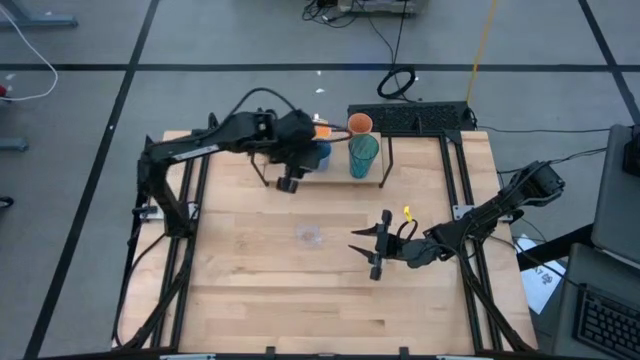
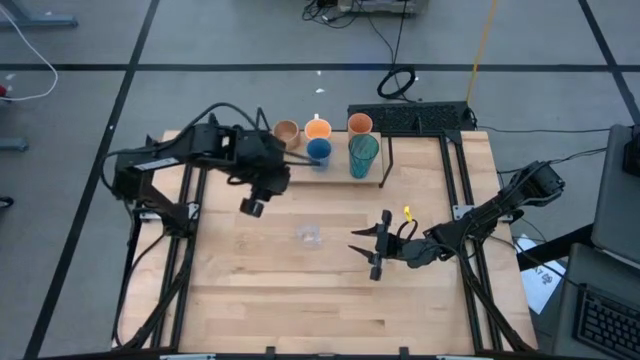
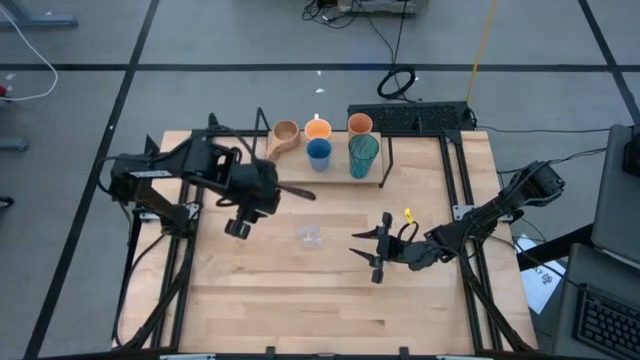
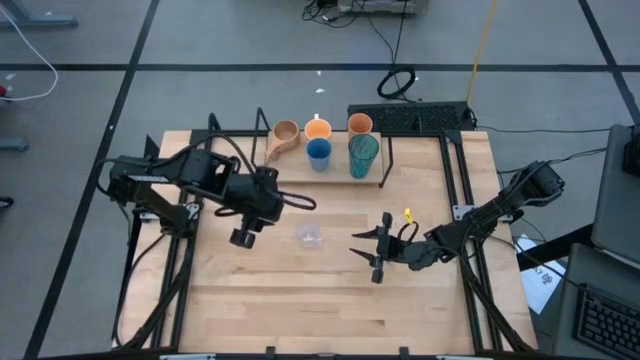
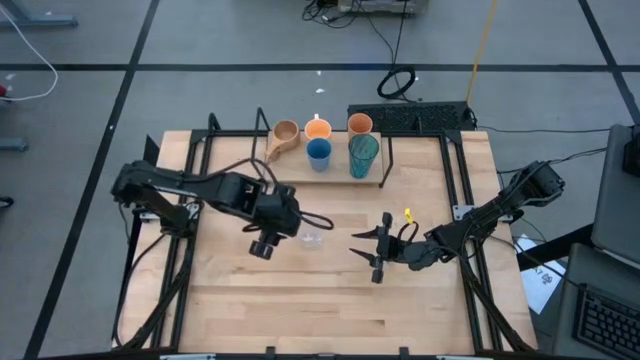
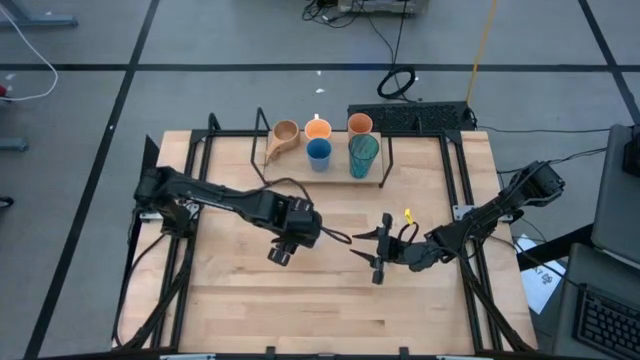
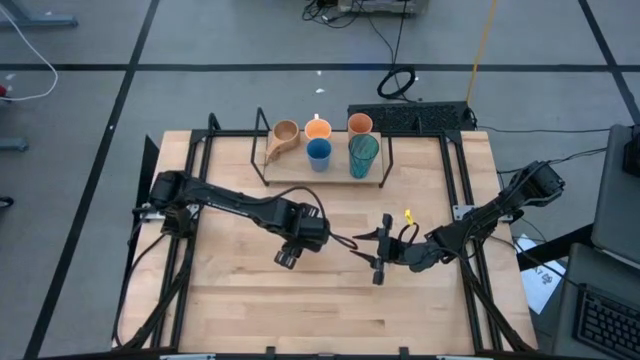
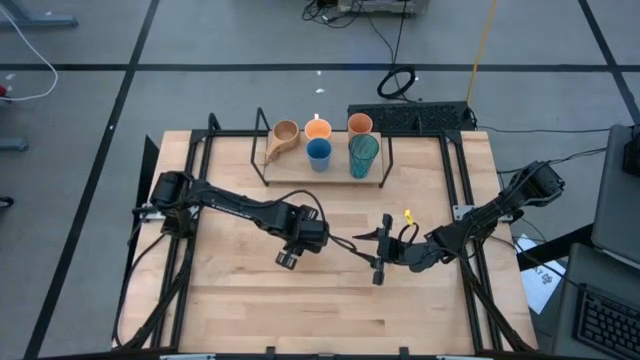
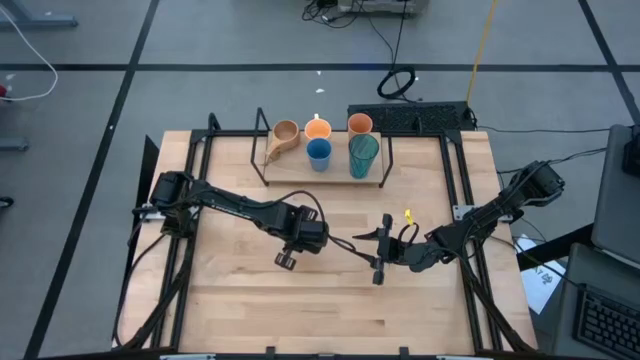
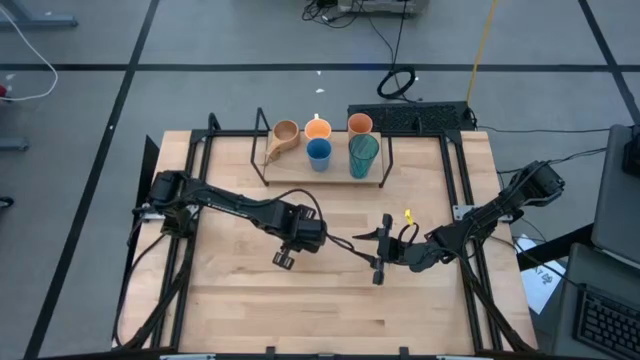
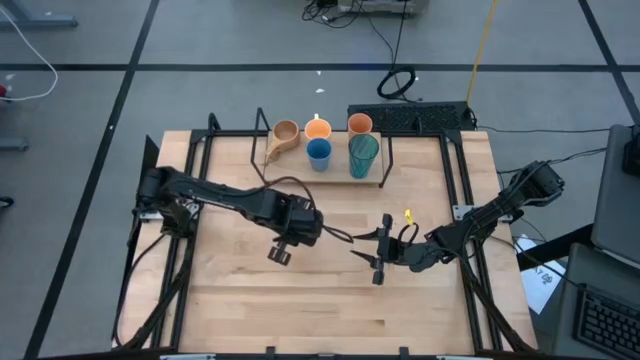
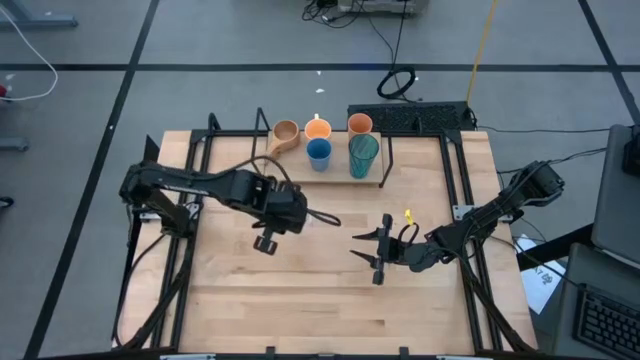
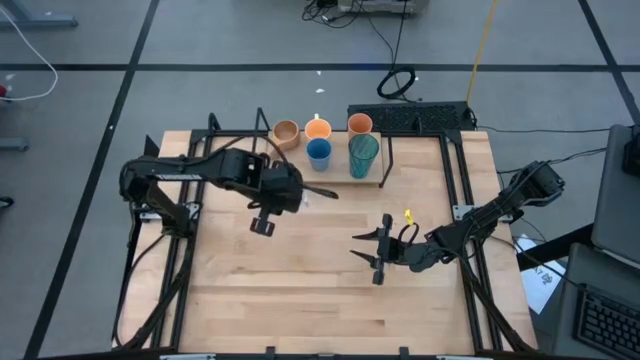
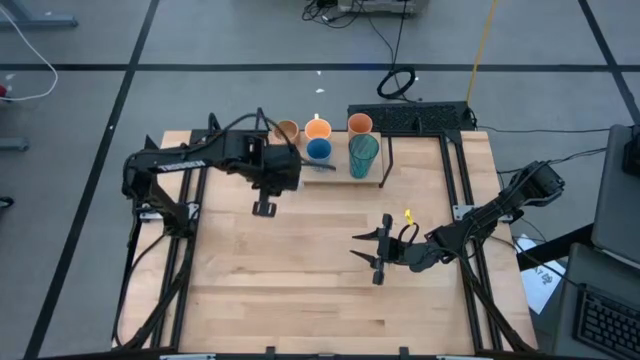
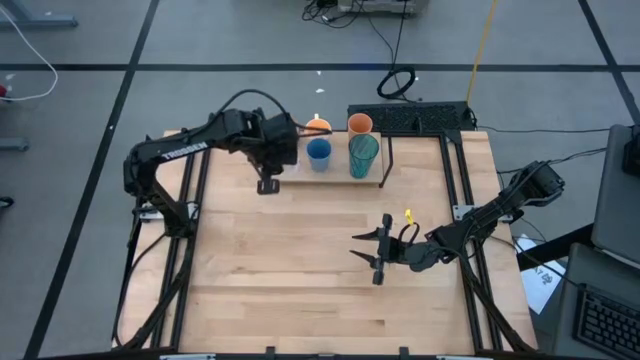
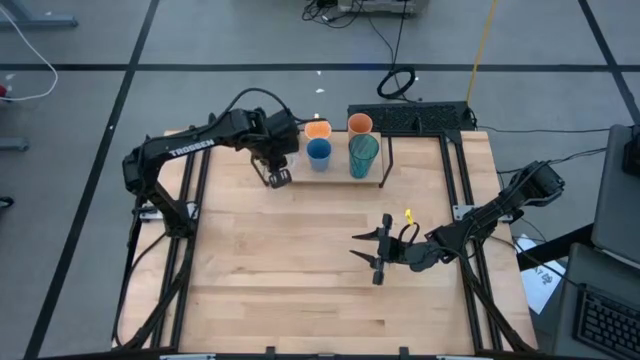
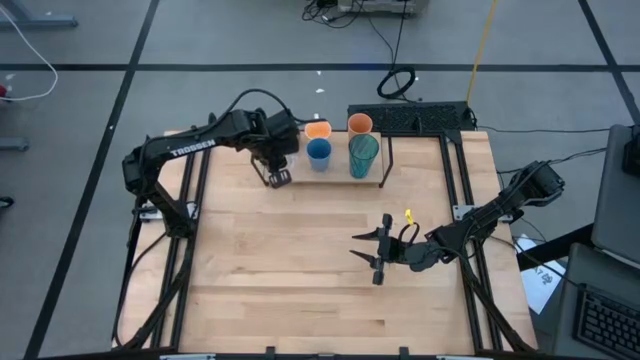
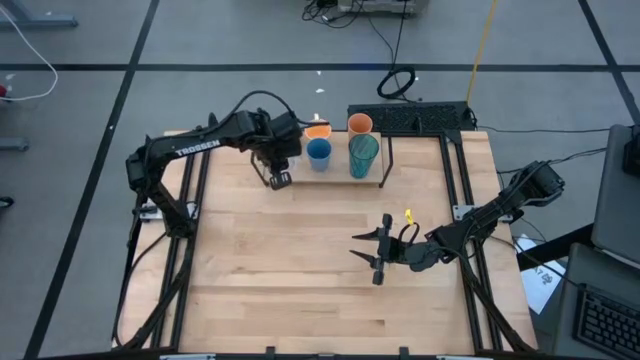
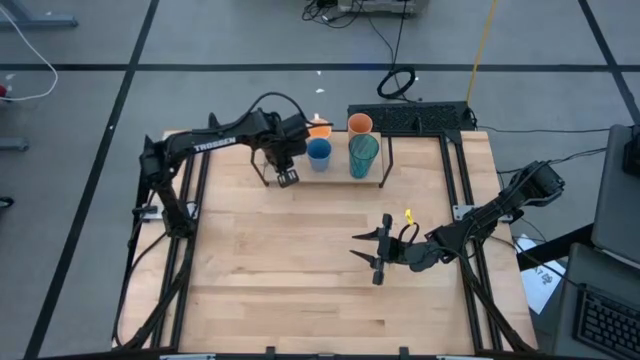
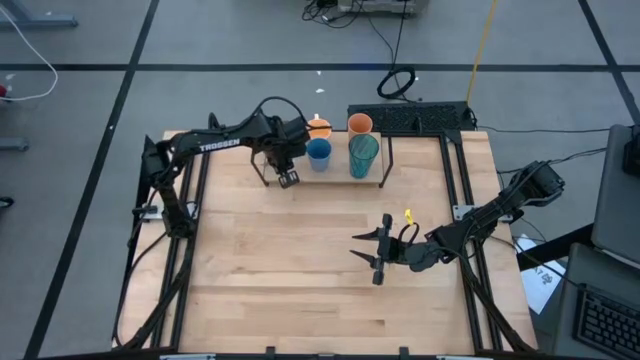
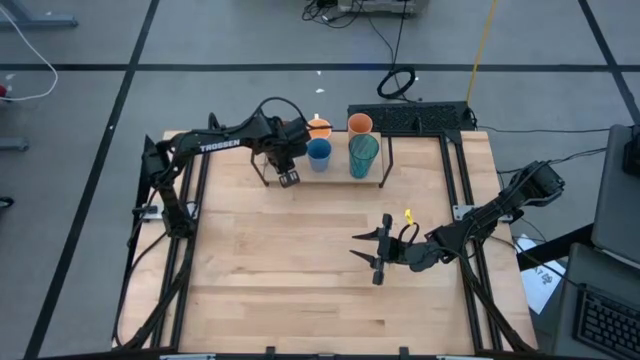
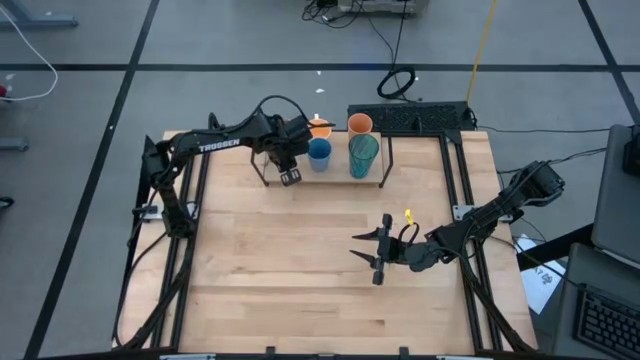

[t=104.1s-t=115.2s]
Task: Stack small to large cups/mugs on shelf
Put the transparent mug on the shelf

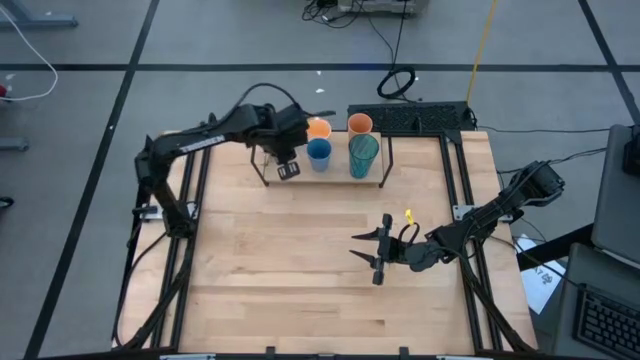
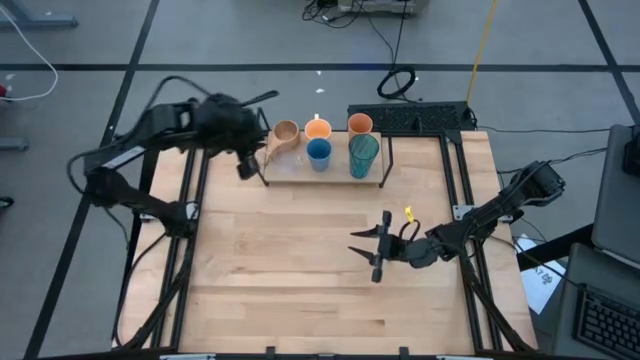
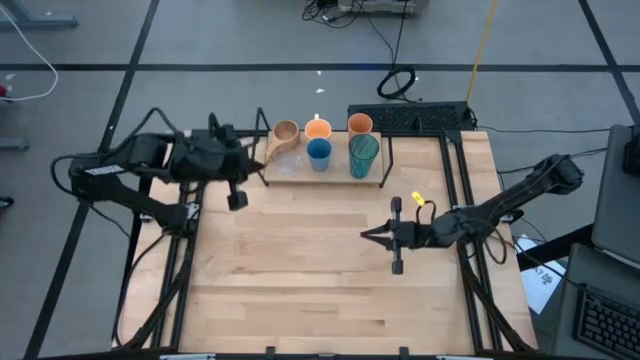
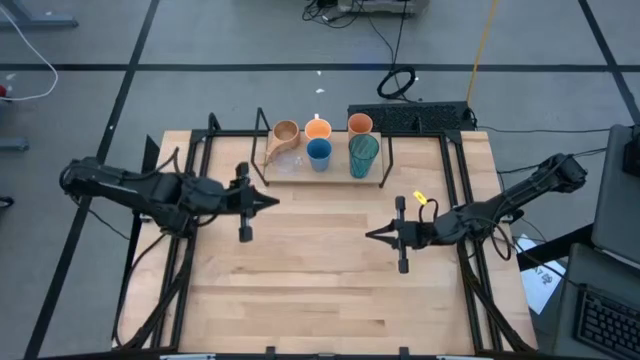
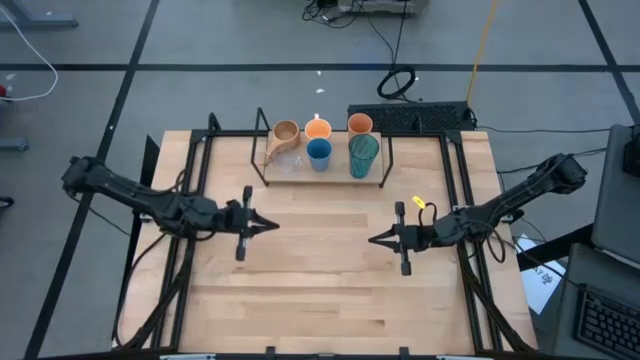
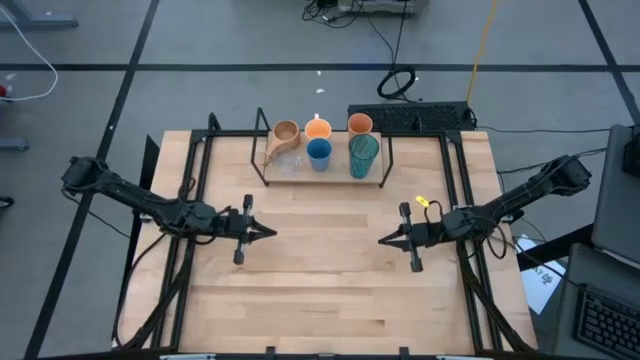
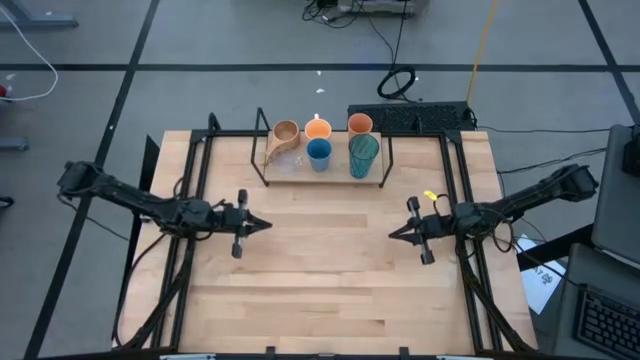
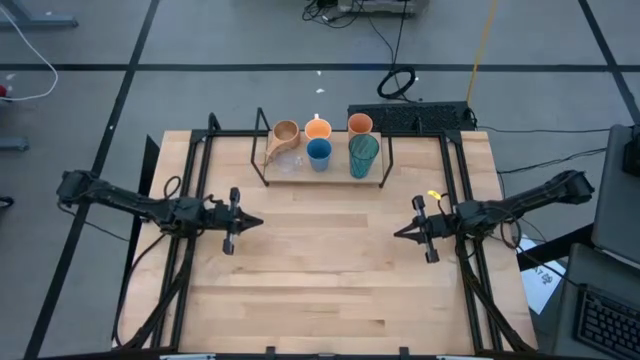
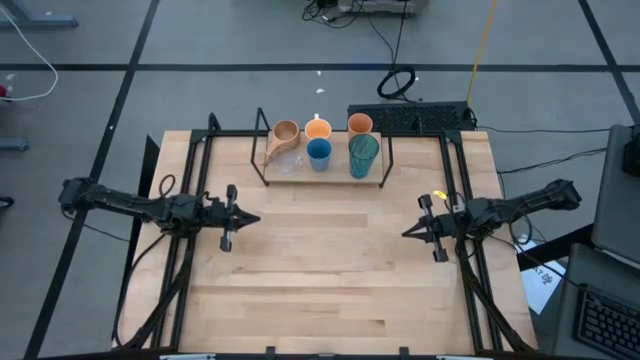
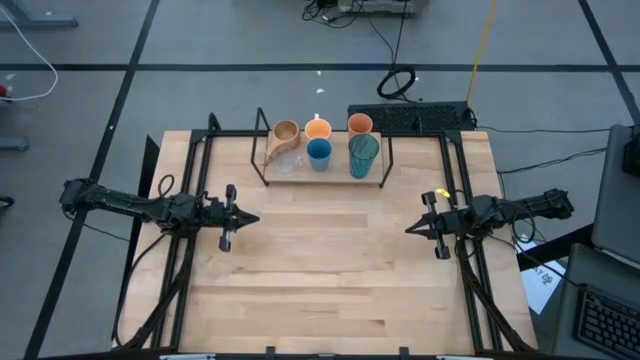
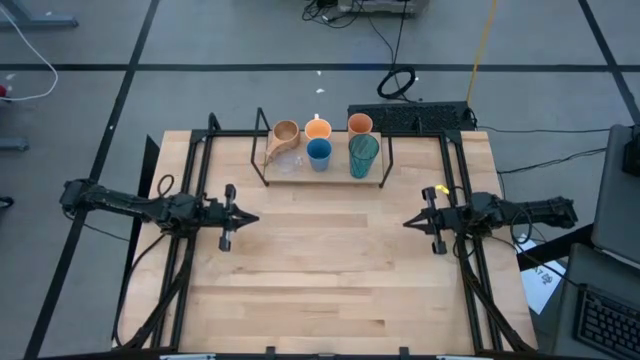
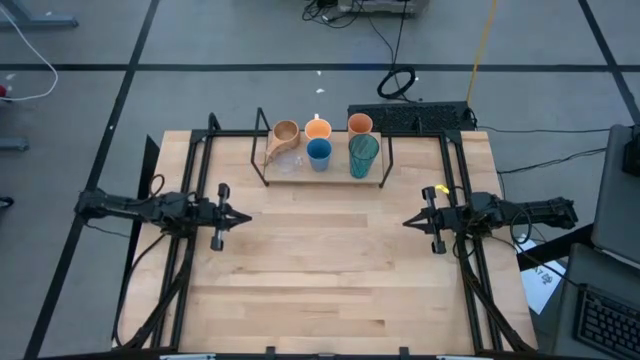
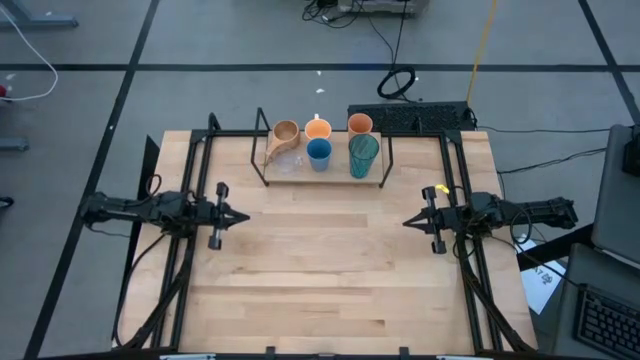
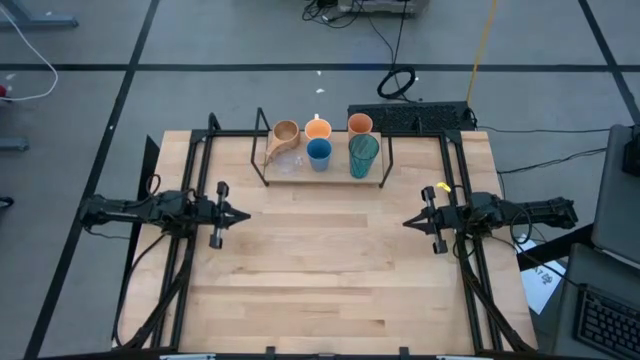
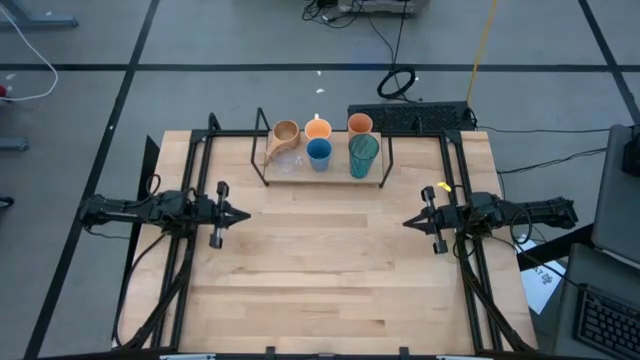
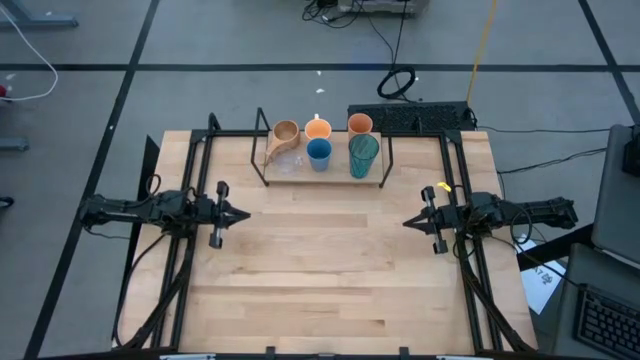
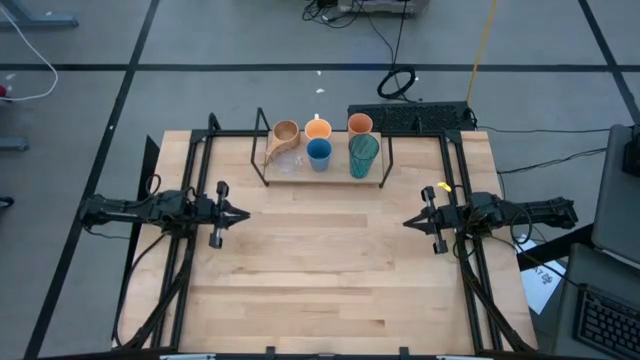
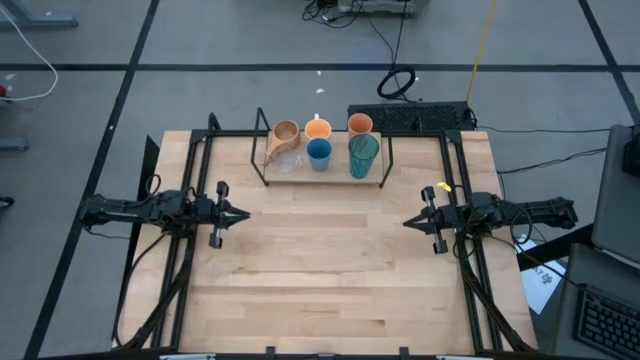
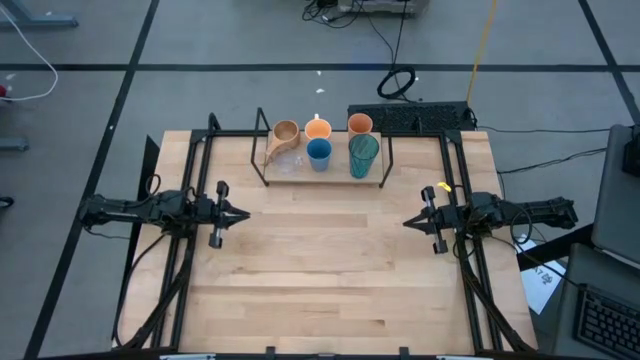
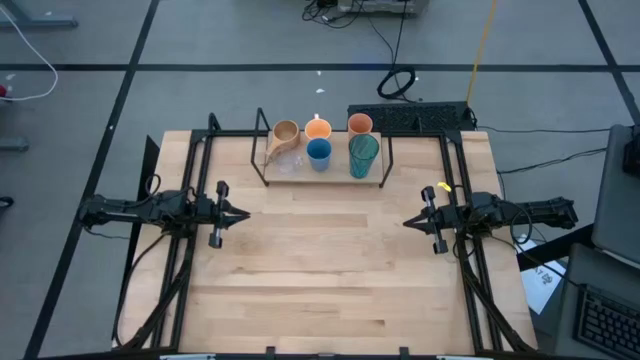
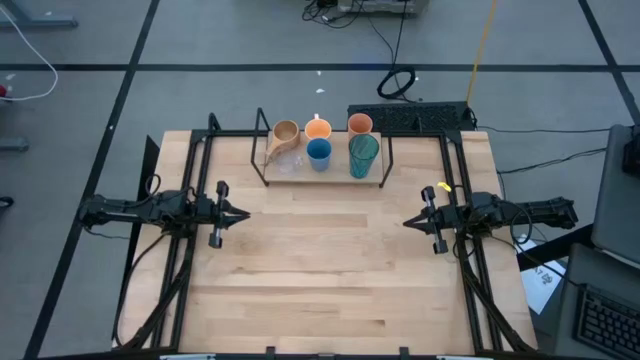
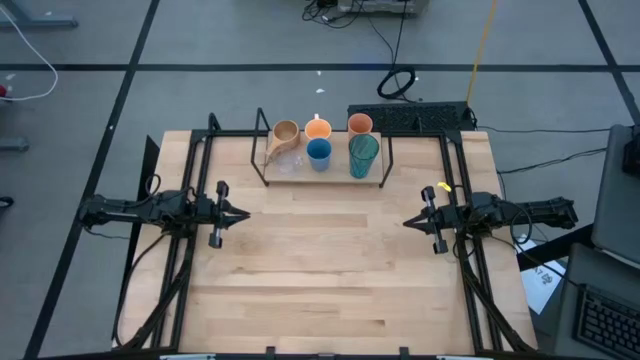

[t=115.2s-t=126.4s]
Return to Home Position
